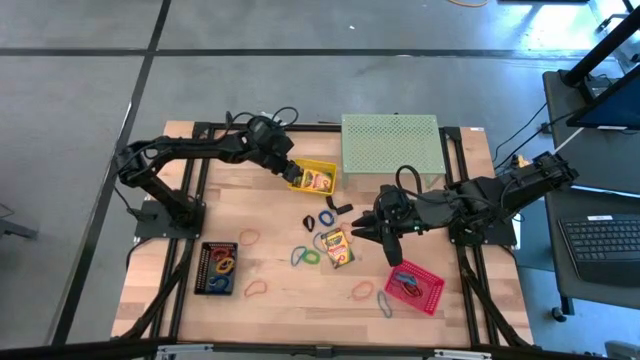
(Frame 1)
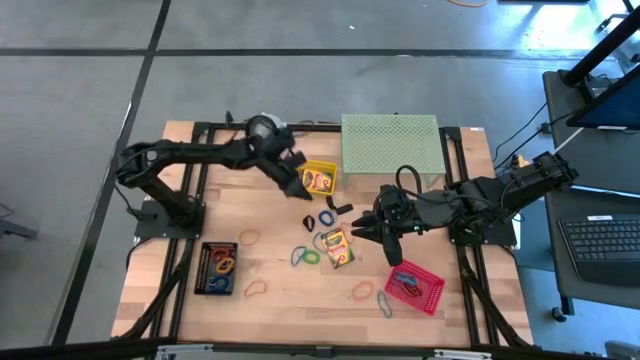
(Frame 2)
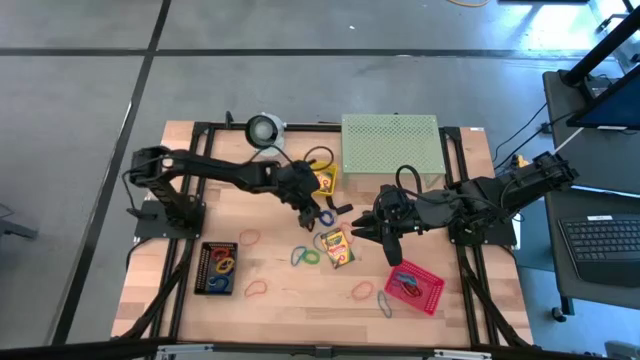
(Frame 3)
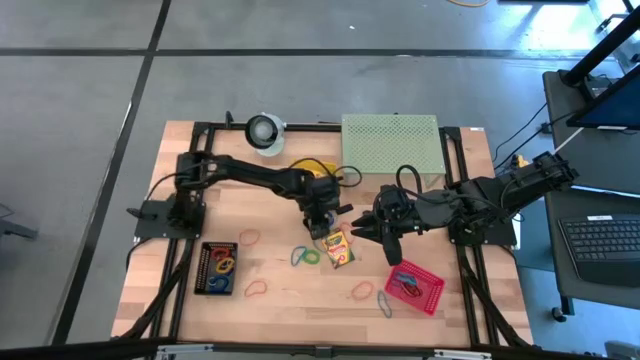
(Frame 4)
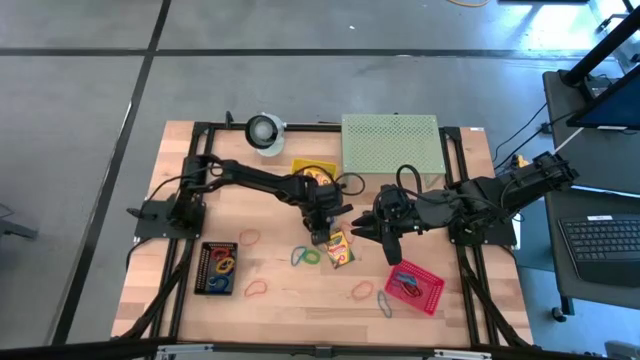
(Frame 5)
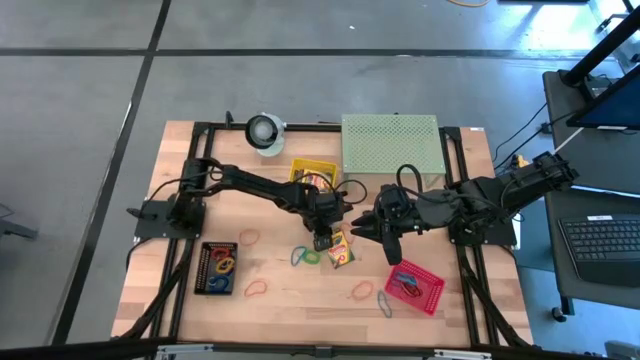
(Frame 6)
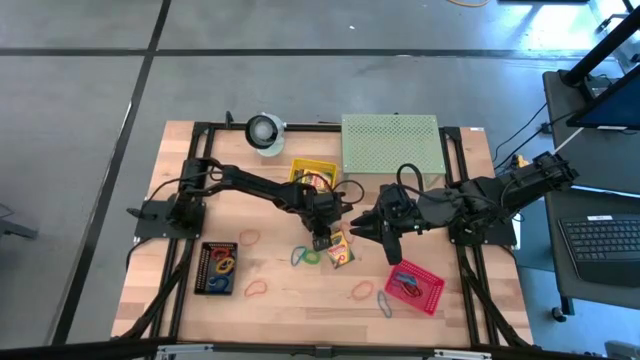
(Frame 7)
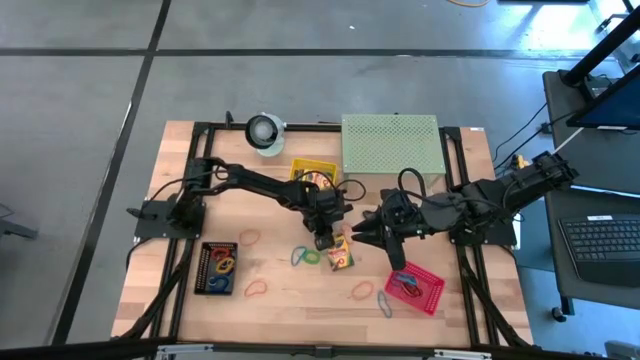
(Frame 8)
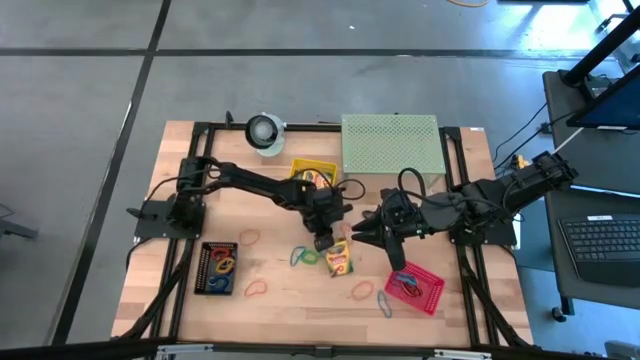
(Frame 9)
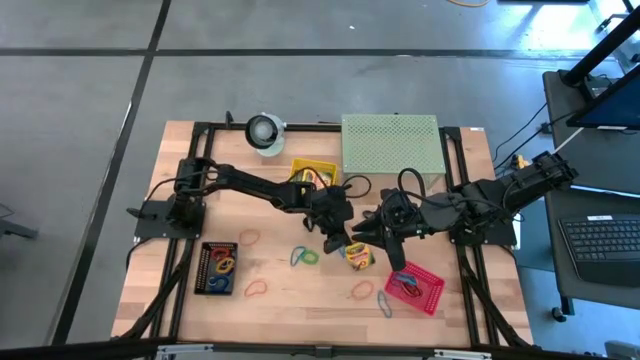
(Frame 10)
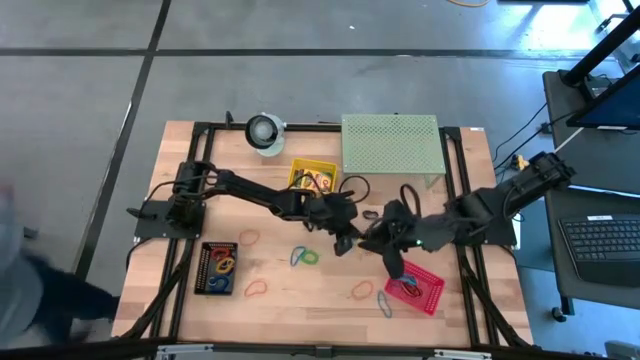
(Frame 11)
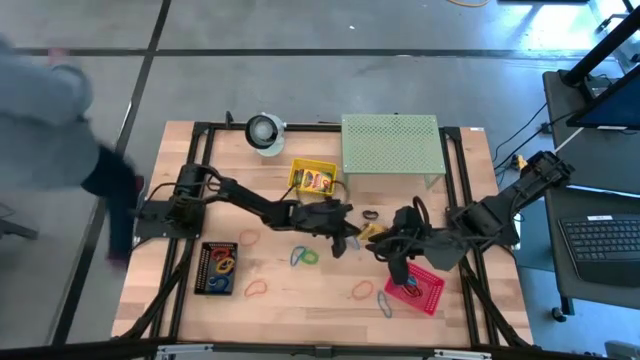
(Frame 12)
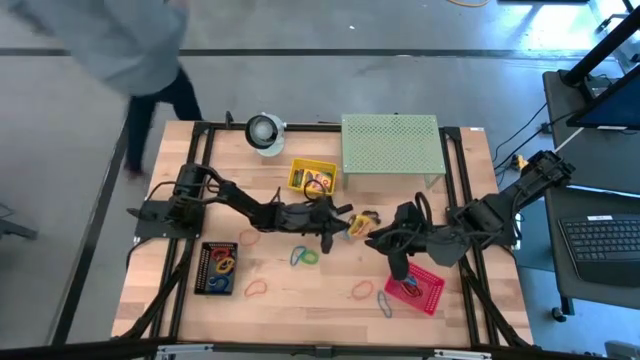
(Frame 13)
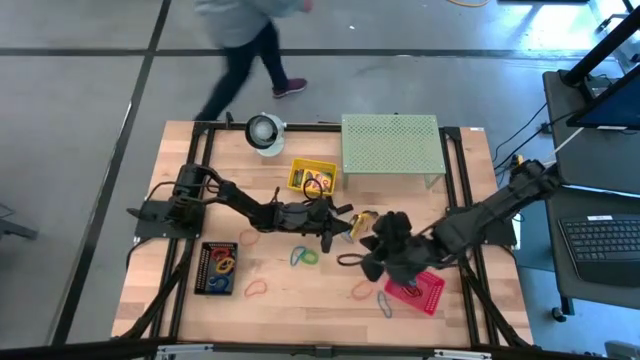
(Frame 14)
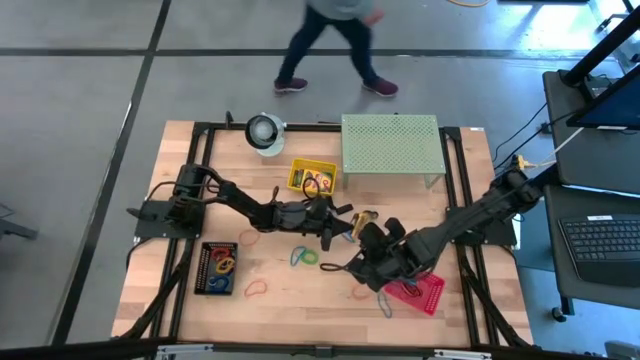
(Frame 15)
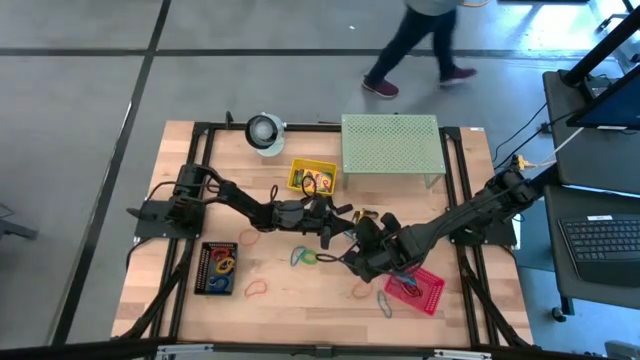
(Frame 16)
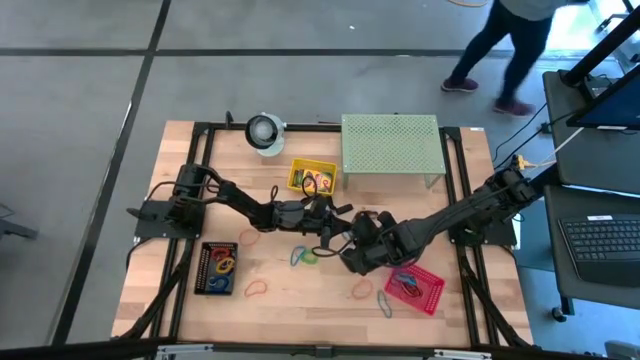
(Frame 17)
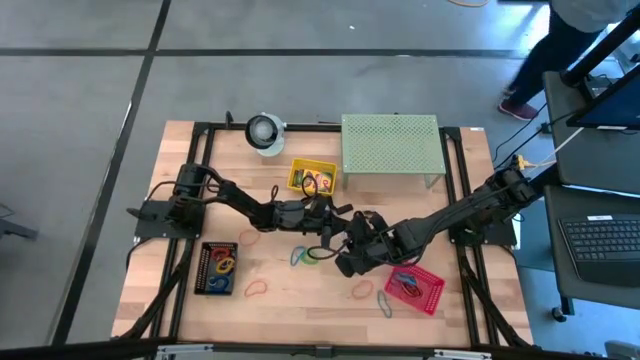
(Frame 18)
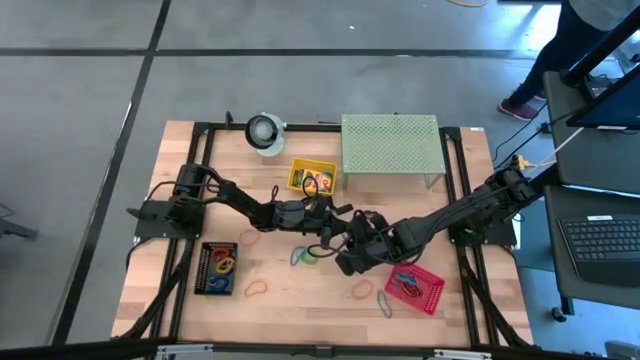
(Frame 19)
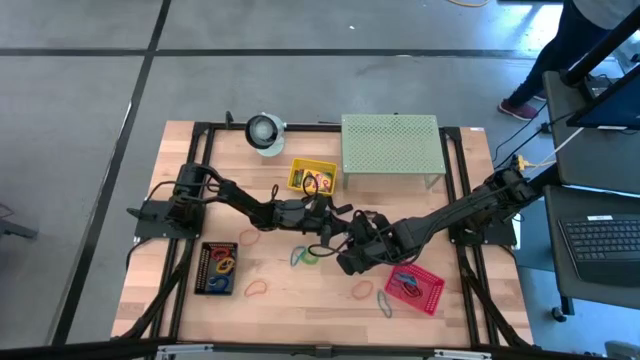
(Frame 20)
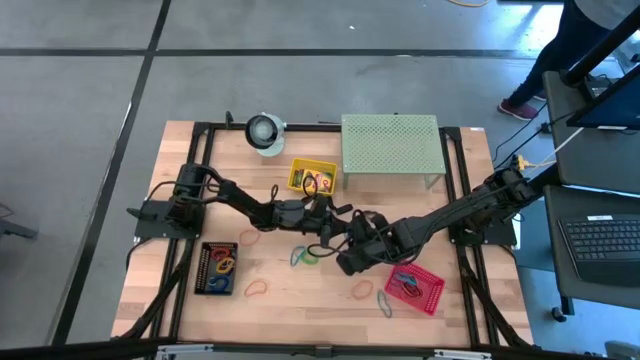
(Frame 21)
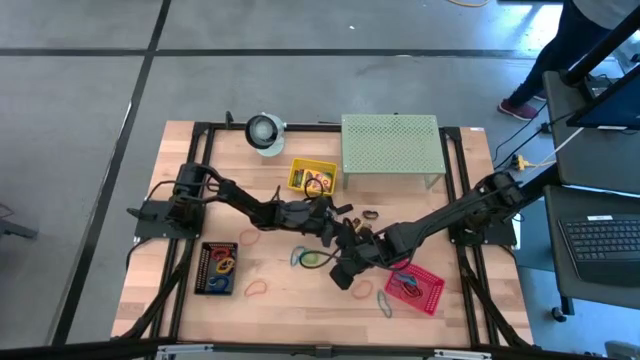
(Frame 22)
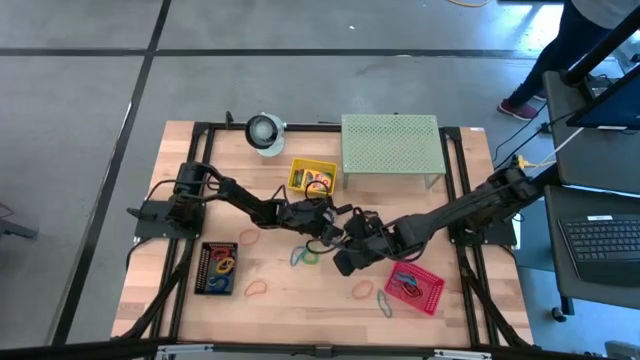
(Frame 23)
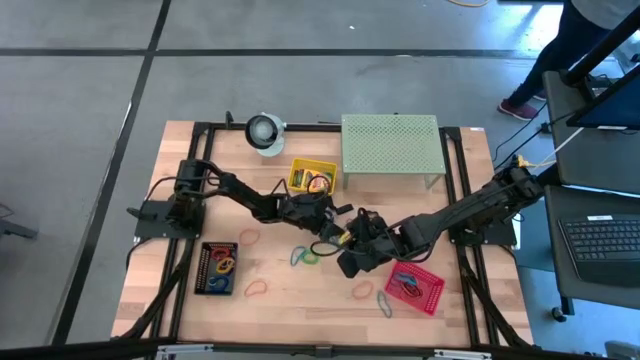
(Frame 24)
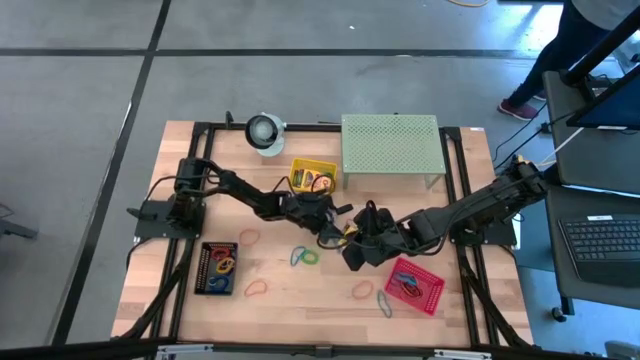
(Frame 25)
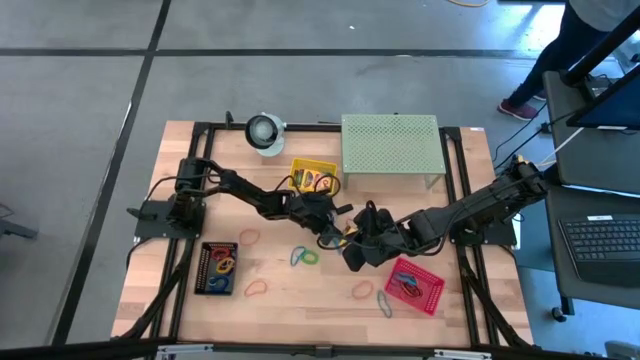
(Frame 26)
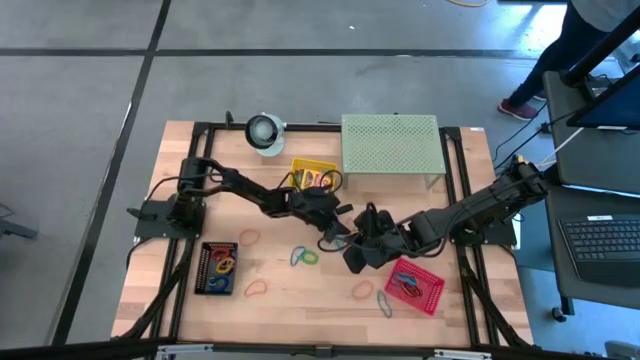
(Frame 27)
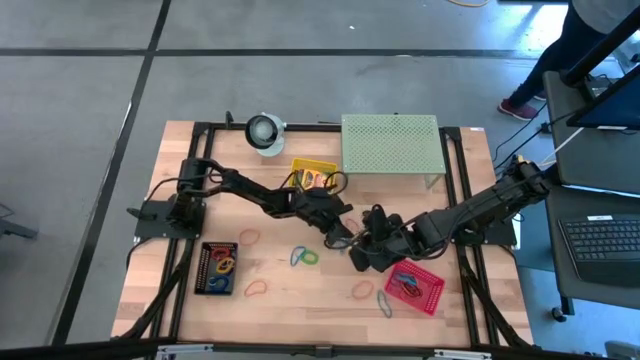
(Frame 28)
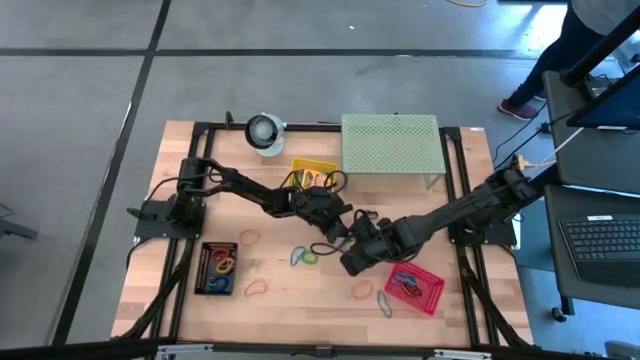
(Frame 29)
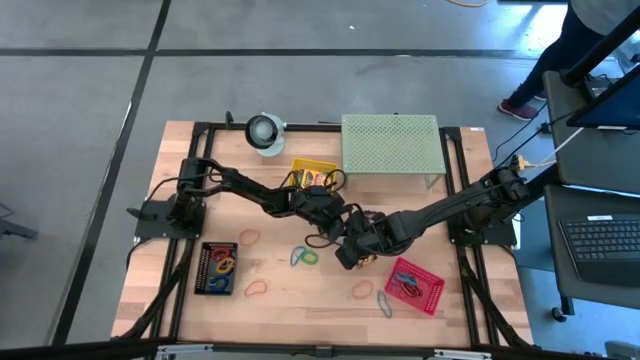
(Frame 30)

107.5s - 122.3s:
Task: Pick & Place Office Desk Supplies
Put the crayon box into the yellow bin

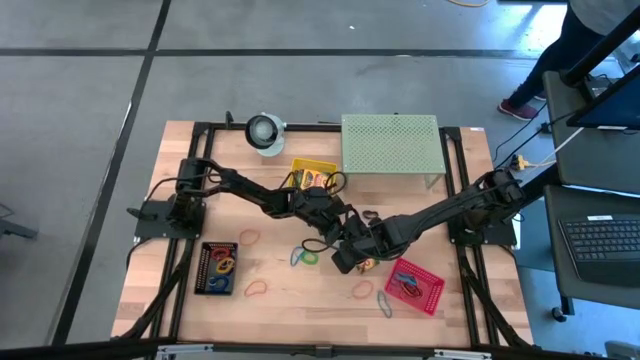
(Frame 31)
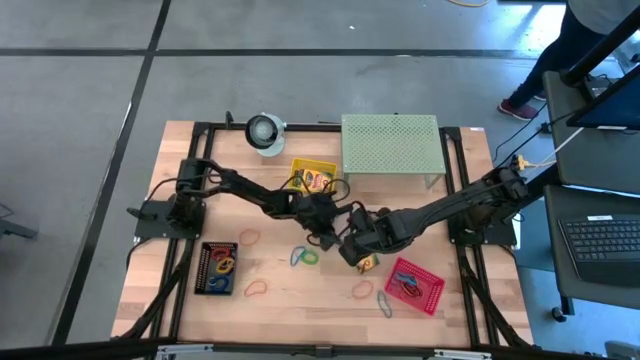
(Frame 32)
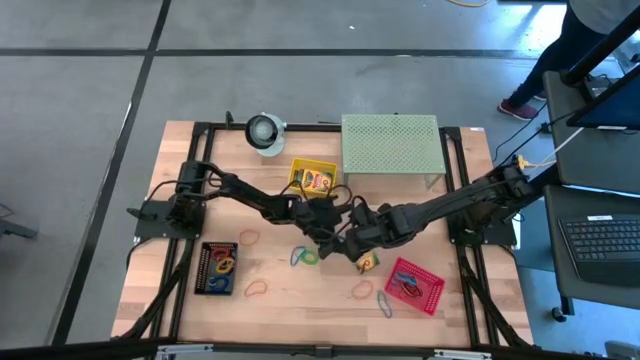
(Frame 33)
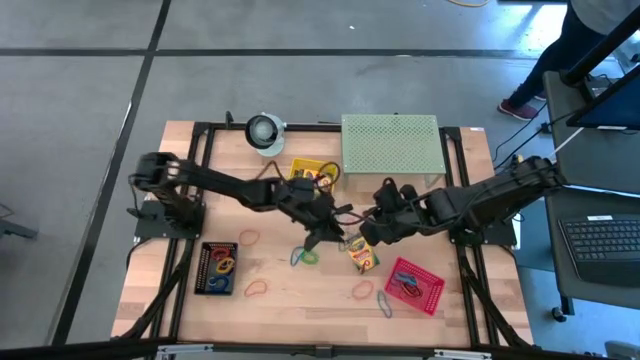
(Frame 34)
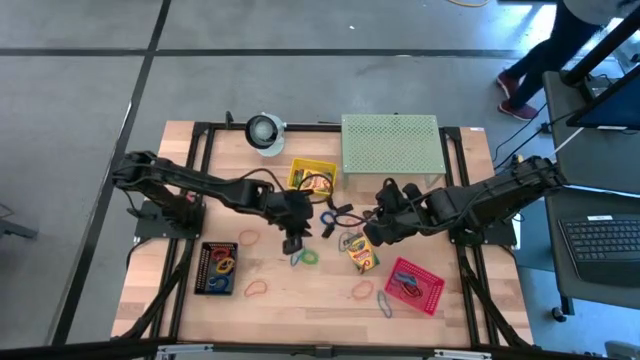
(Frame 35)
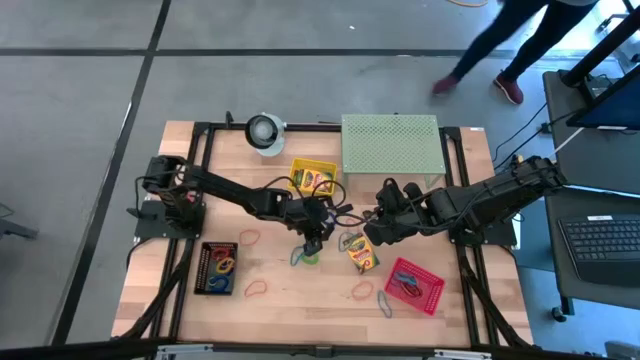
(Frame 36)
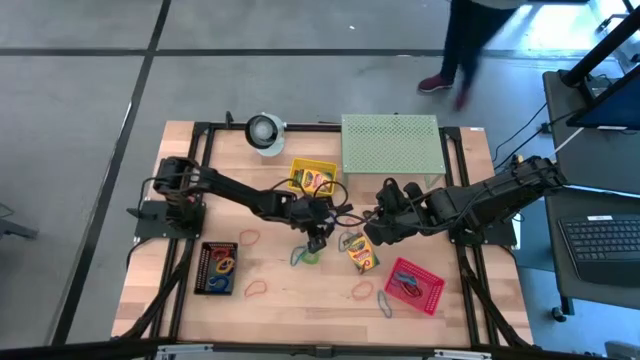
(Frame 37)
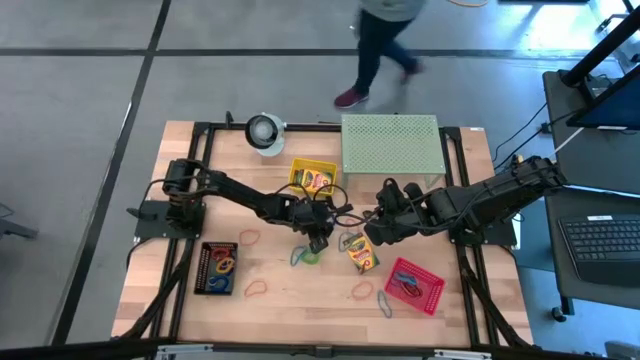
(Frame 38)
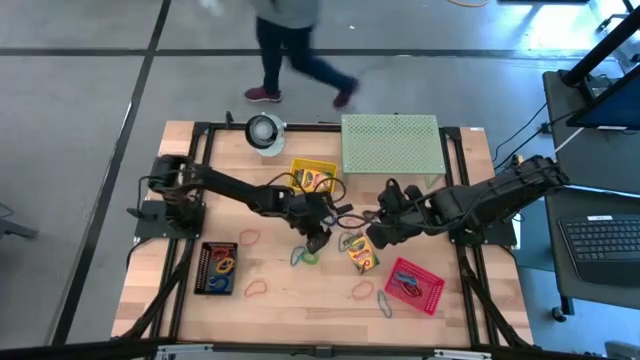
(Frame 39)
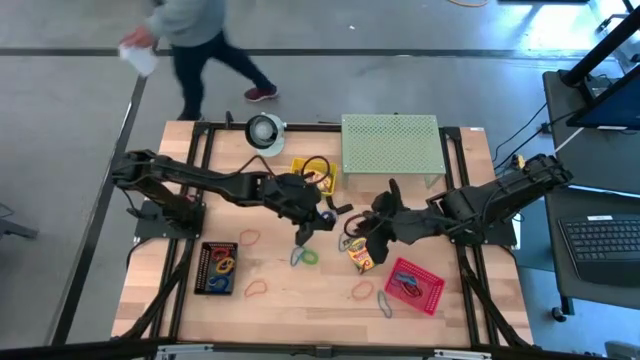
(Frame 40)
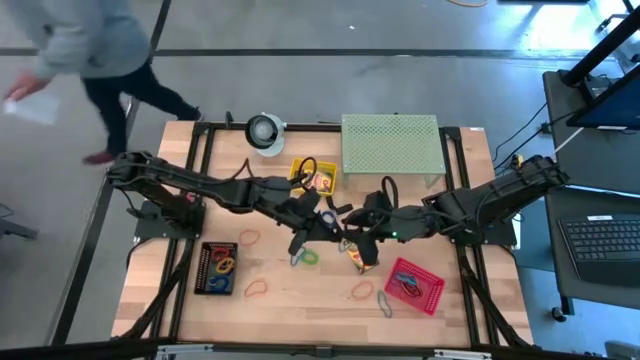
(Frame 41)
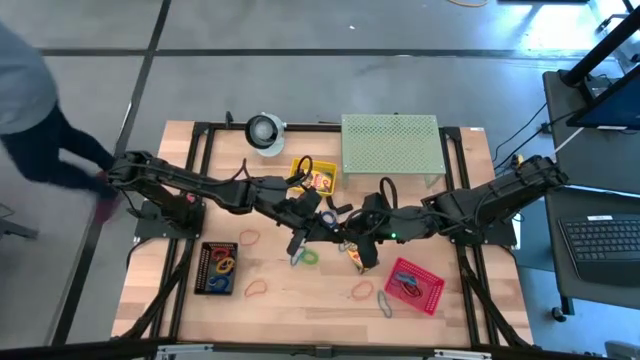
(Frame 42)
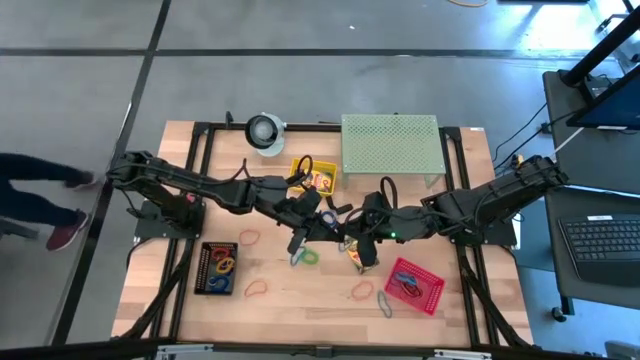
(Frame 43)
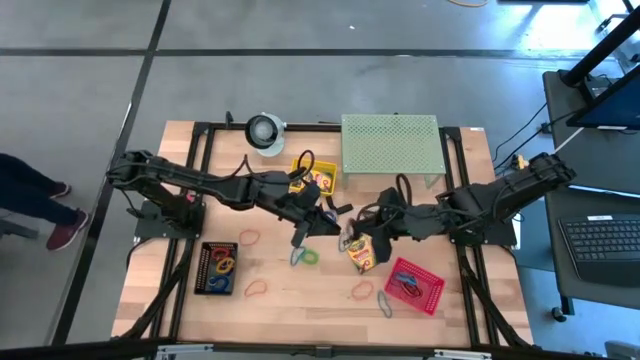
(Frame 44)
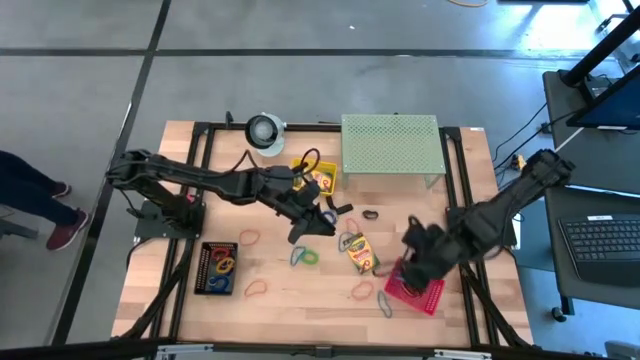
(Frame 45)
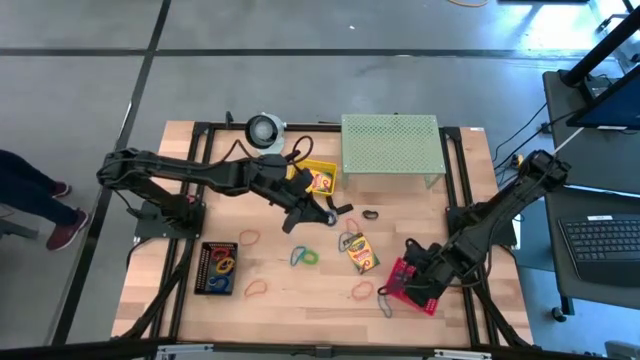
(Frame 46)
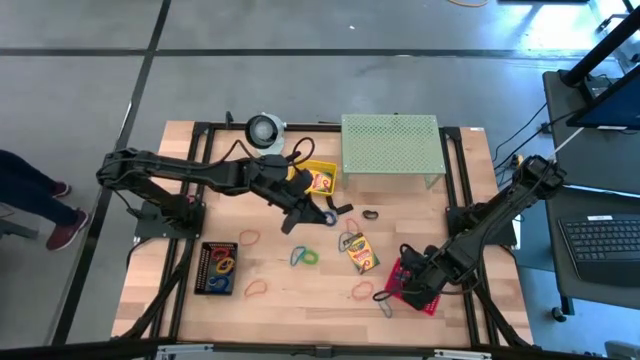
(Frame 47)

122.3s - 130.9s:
Put the black rubber band into the red bin
